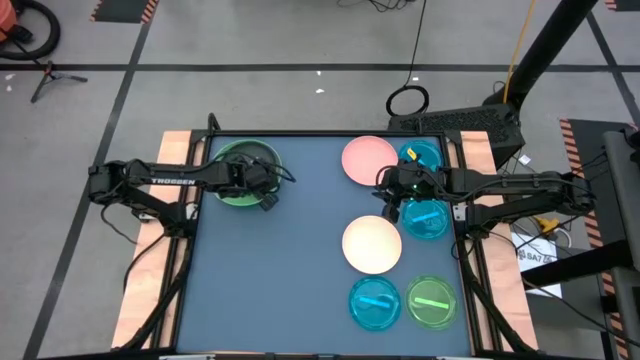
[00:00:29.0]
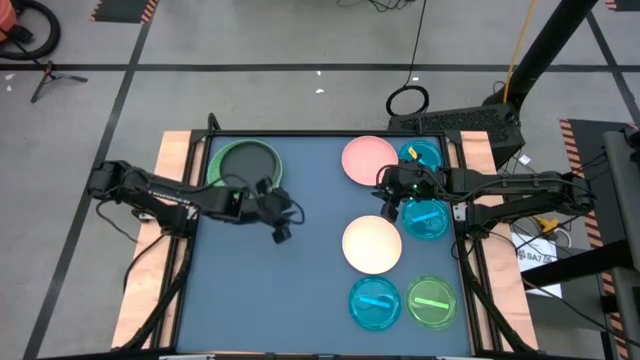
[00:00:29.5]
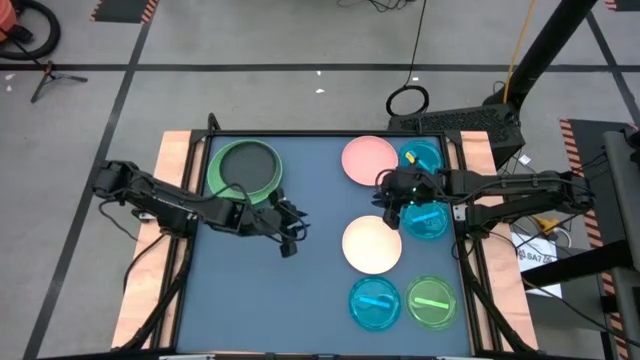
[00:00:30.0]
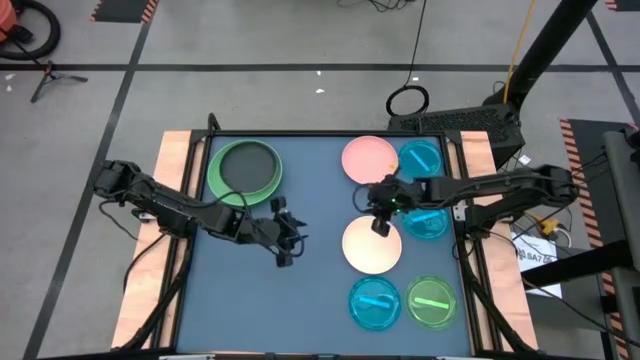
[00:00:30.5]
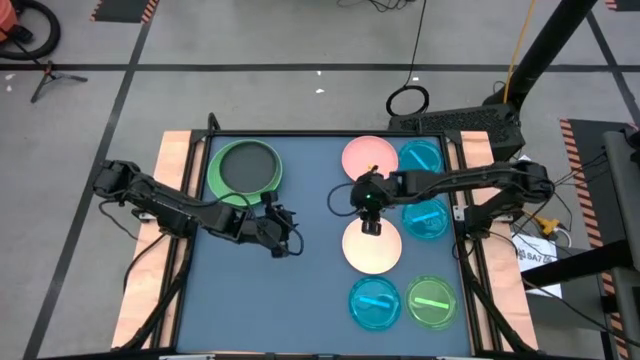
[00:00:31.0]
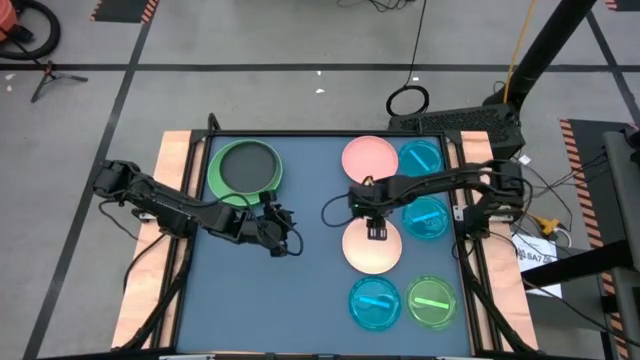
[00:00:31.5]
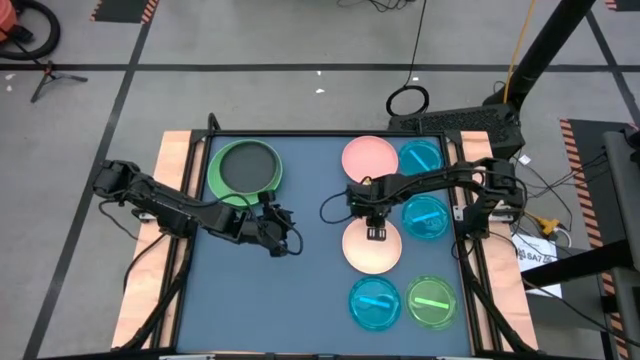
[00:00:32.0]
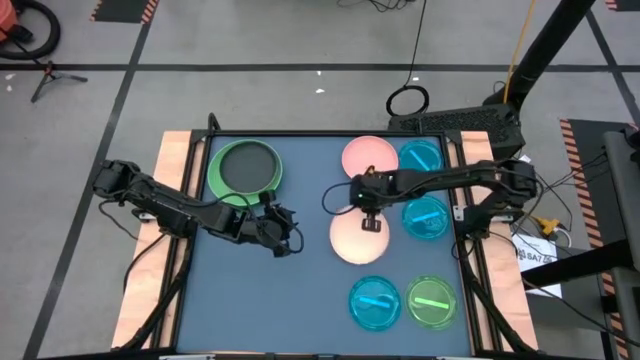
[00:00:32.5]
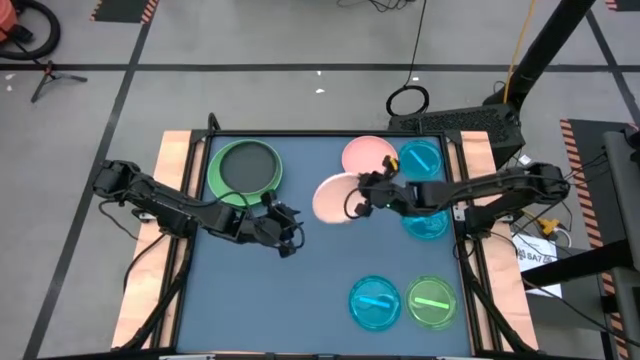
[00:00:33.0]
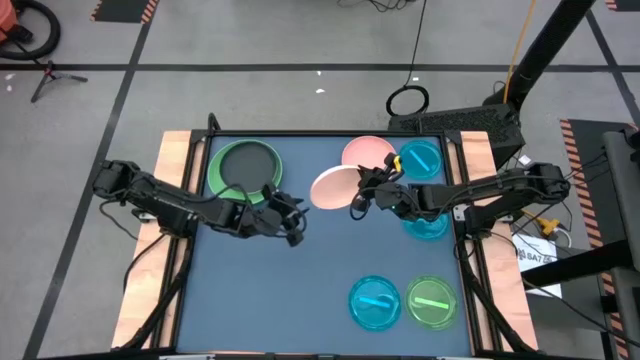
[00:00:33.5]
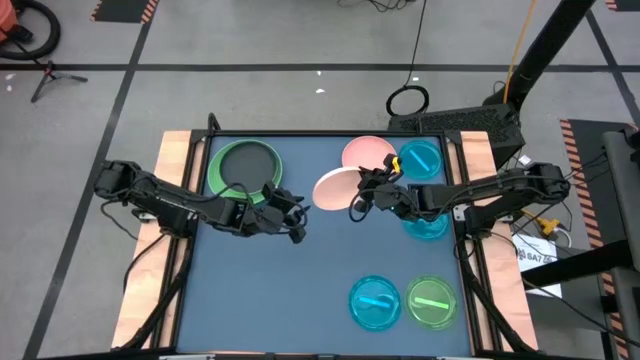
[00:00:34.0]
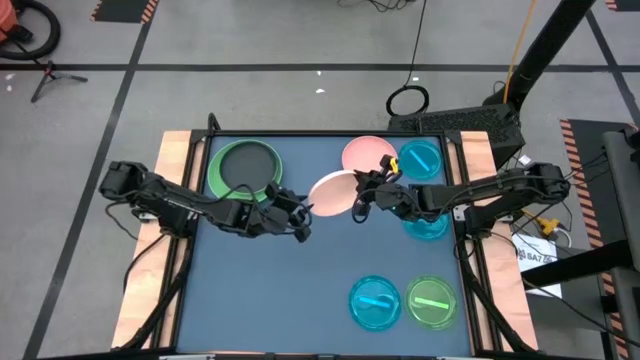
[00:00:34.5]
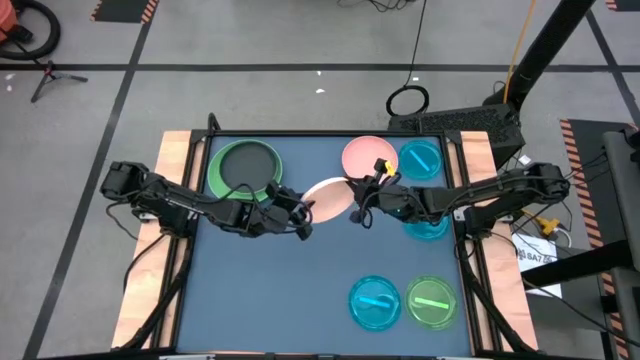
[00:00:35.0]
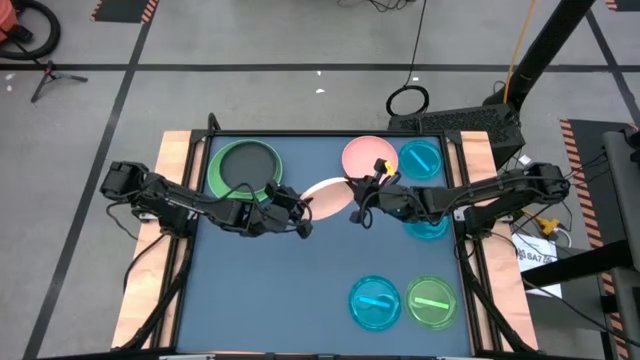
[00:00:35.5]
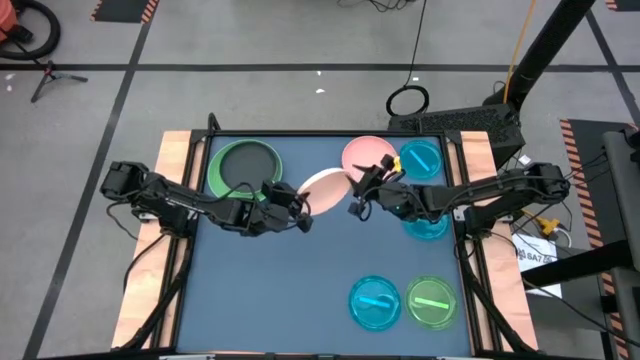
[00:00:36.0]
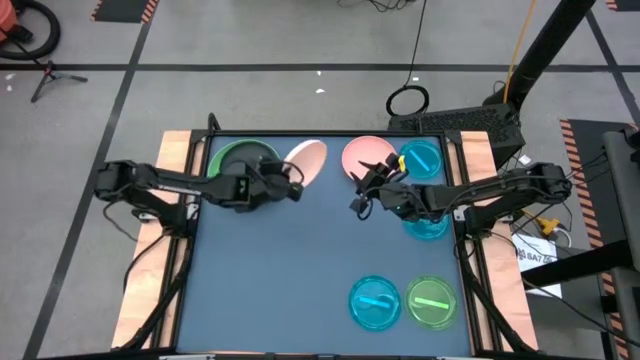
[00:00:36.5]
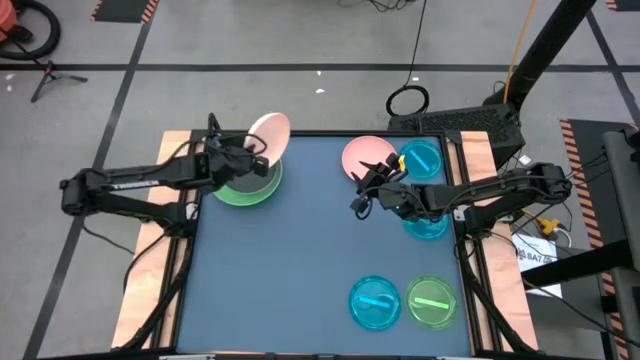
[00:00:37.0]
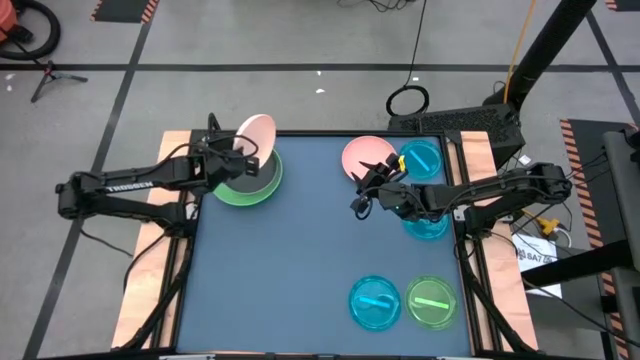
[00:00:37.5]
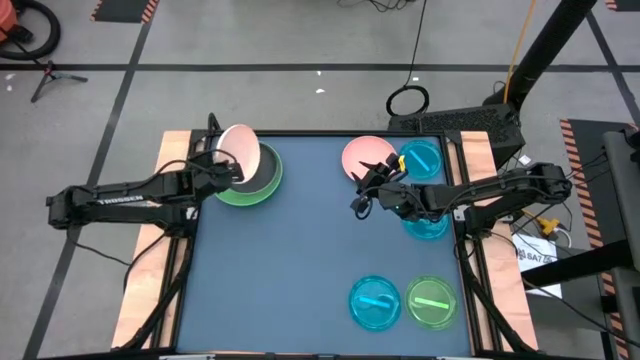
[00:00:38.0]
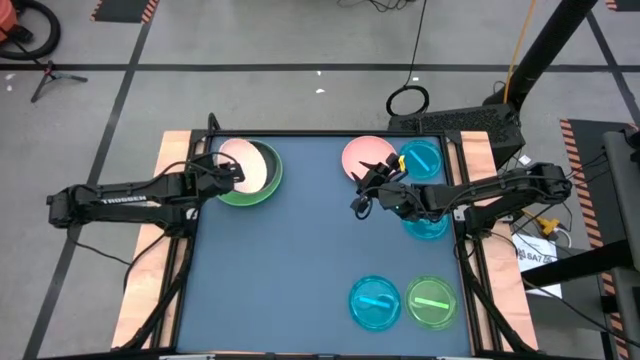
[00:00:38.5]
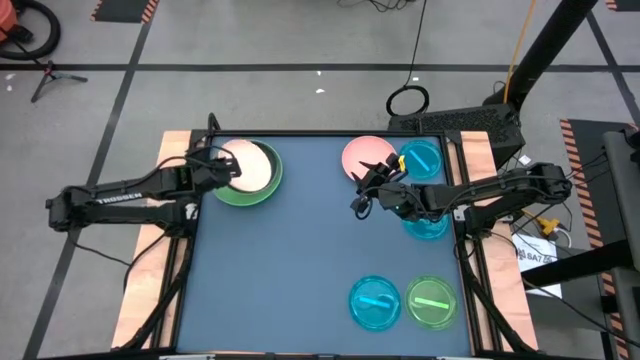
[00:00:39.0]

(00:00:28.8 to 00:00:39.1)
Task: Stack plastic plates
Stack the orange plate on top of the black plate

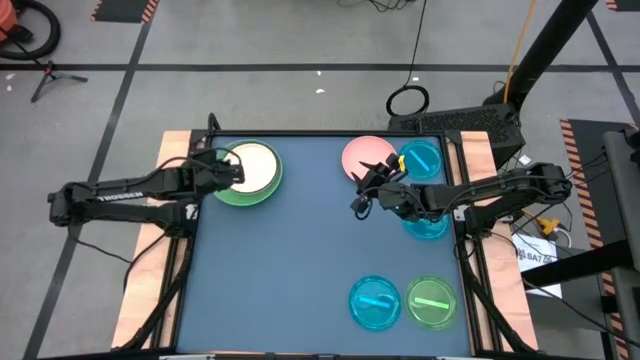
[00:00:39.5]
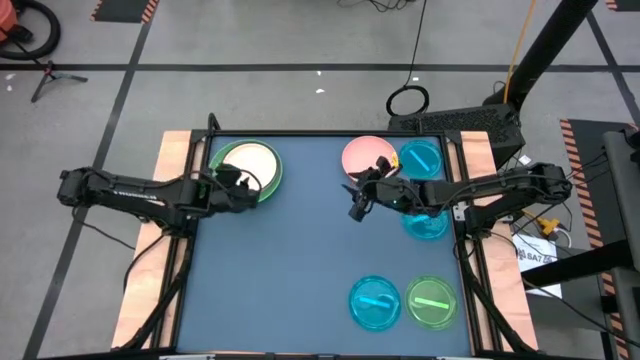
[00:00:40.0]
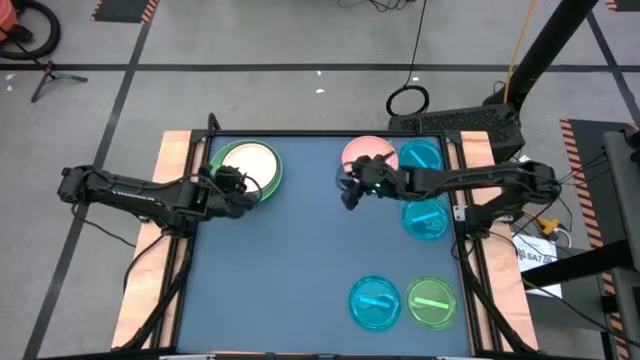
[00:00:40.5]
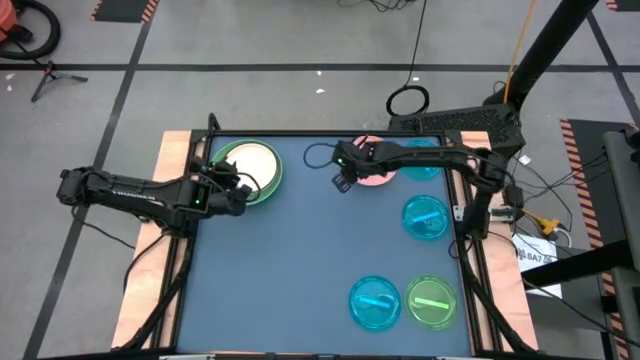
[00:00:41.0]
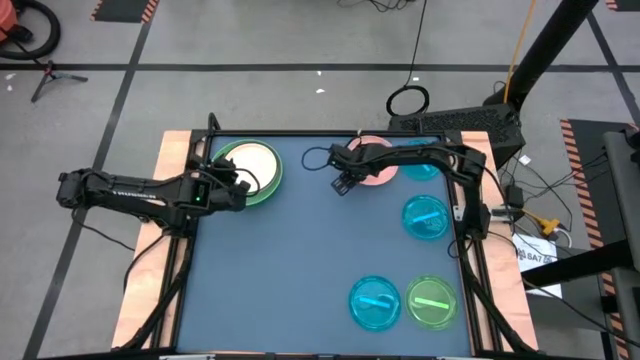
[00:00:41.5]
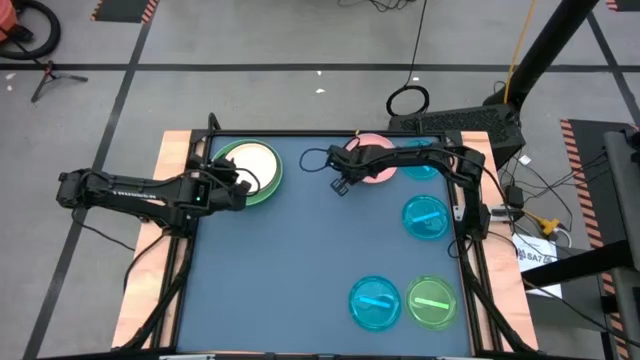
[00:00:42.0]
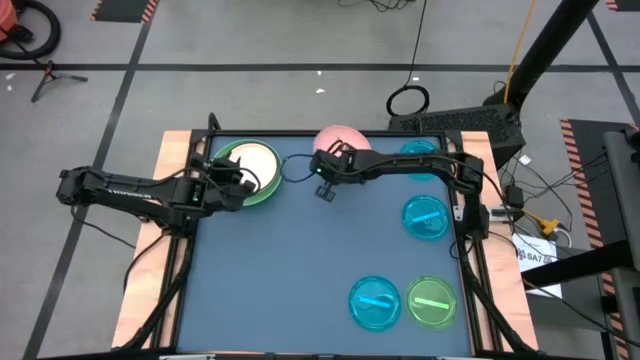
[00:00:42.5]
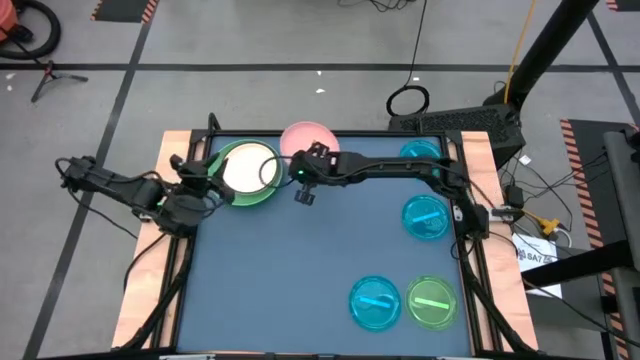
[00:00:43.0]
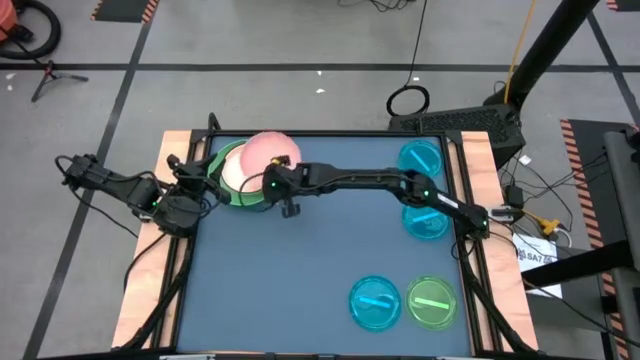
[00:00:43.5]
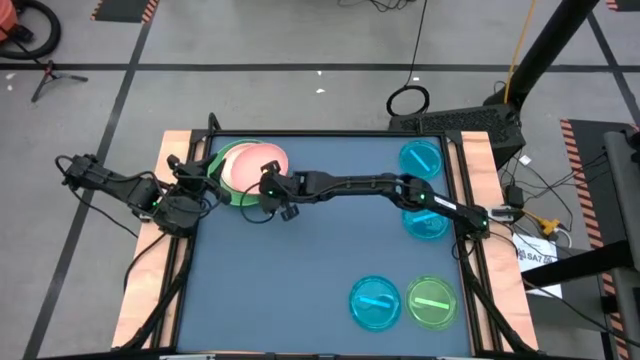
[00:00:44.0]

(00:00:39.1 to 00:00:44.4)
Stack the pink plate on top of the orange plate

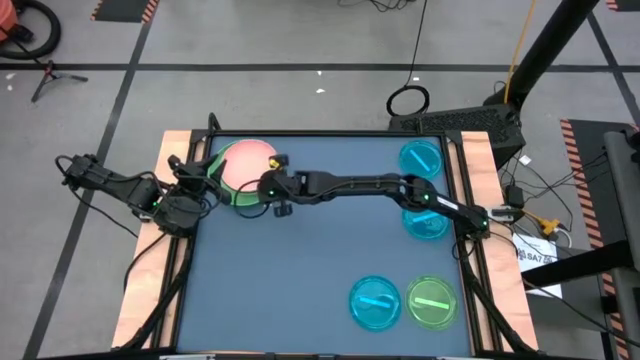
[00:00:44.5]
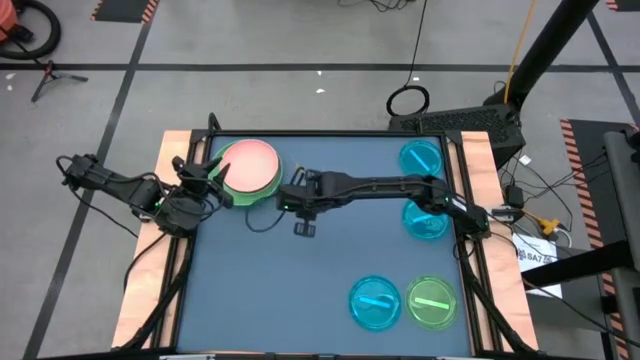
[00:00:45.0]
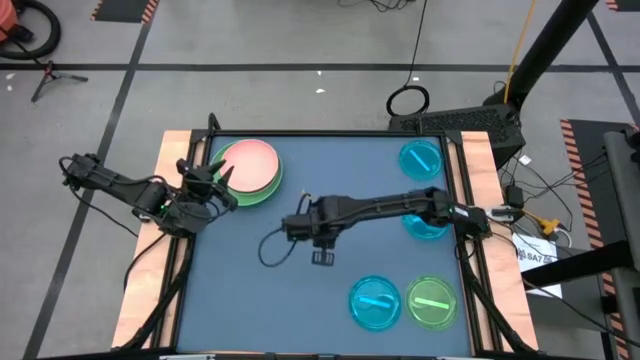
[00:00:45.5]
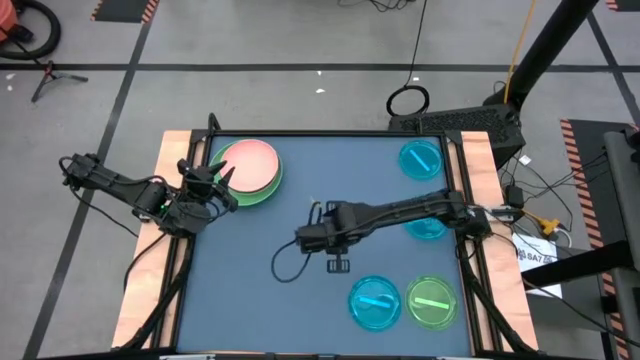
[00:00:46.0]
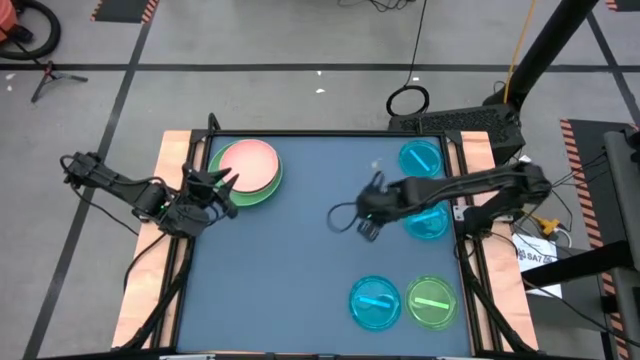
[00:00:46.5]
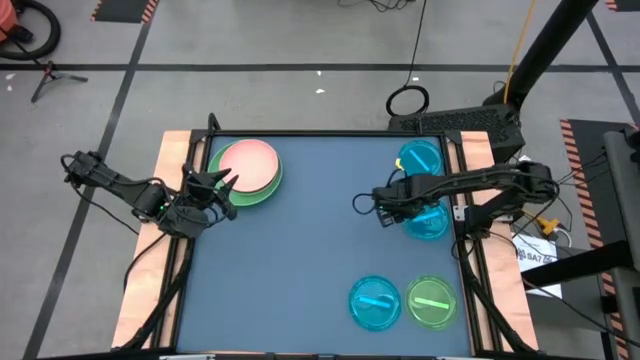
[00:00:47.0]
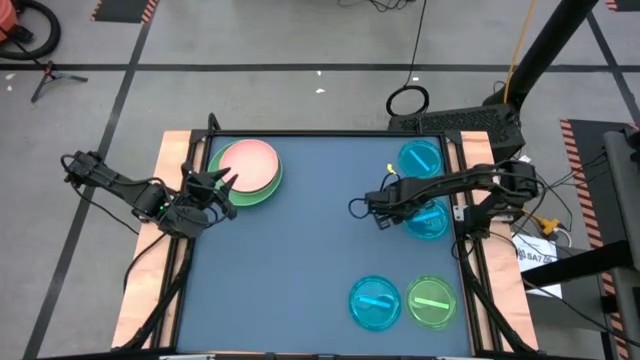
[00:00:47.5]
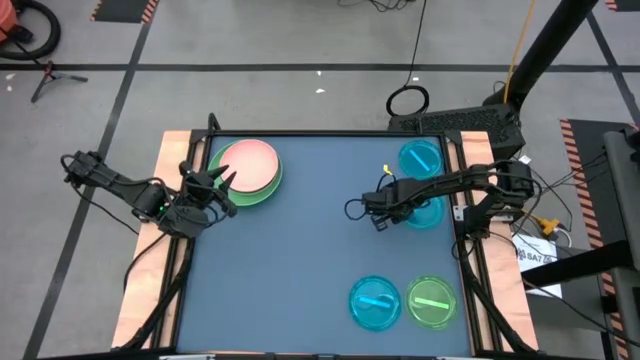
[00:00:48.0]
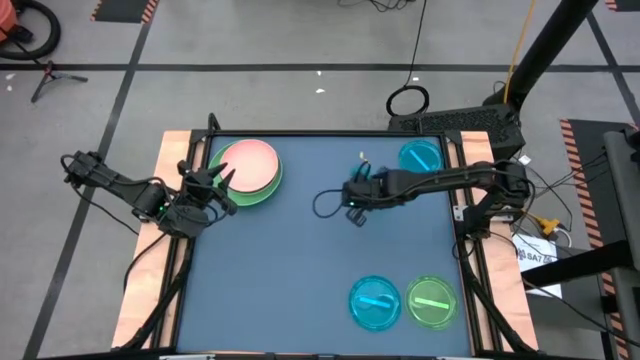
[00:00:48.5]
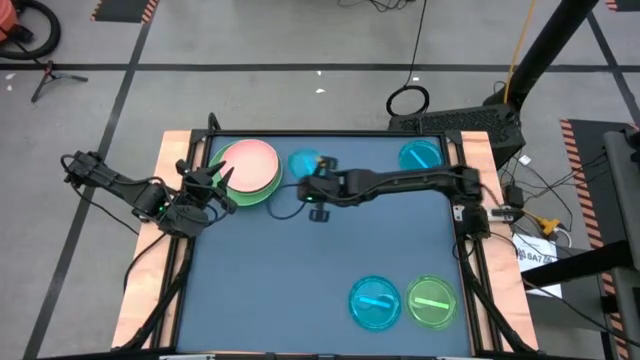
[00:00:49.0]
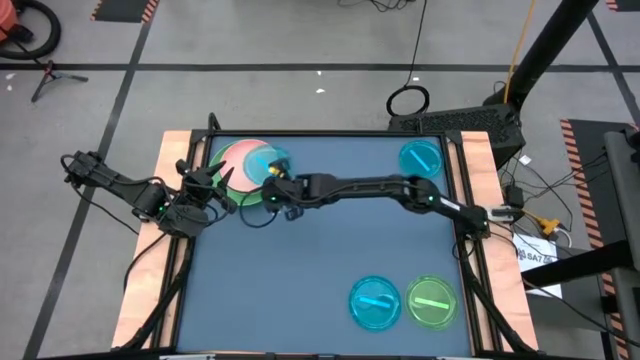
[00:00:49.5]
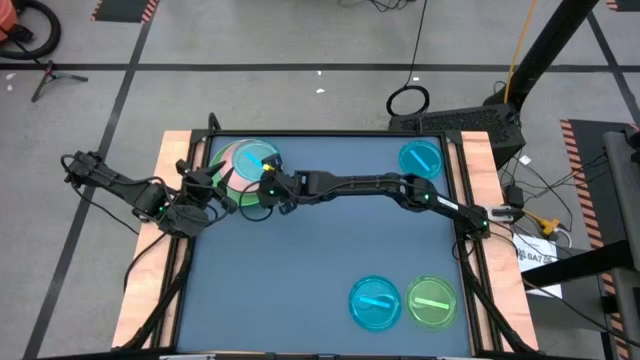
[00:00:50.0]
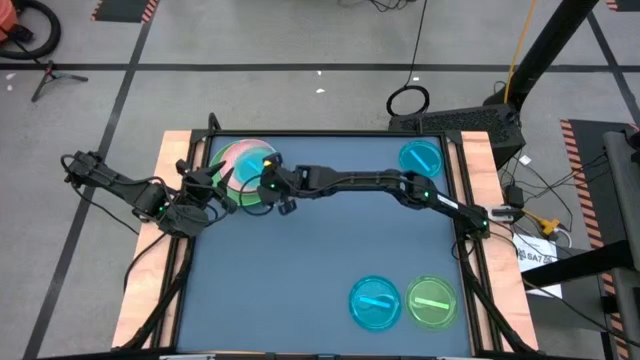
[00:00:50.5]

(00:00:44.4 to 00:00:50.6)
Stack the middle blue plate on top of the pink plate
